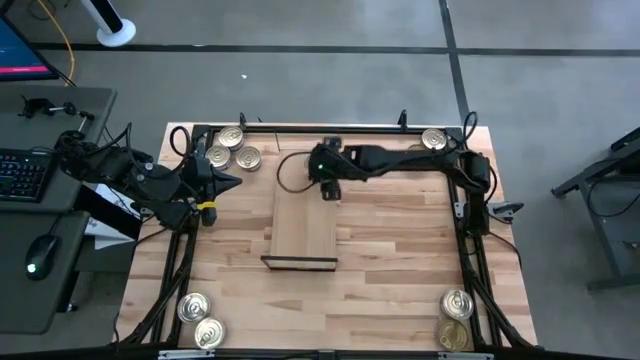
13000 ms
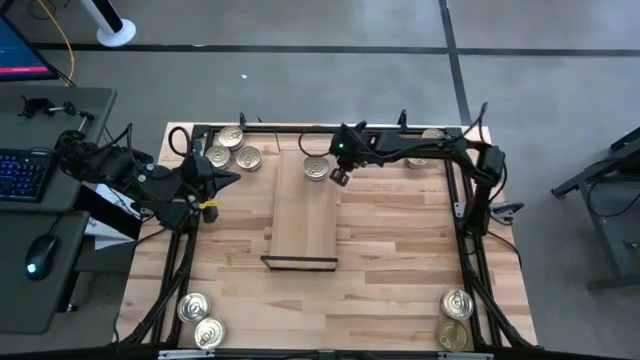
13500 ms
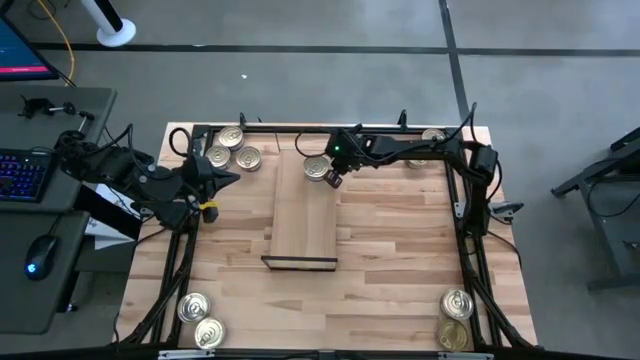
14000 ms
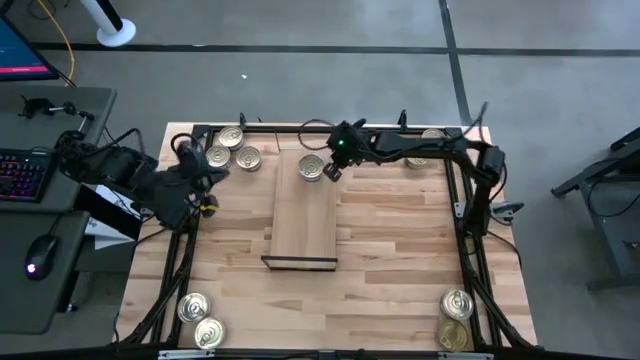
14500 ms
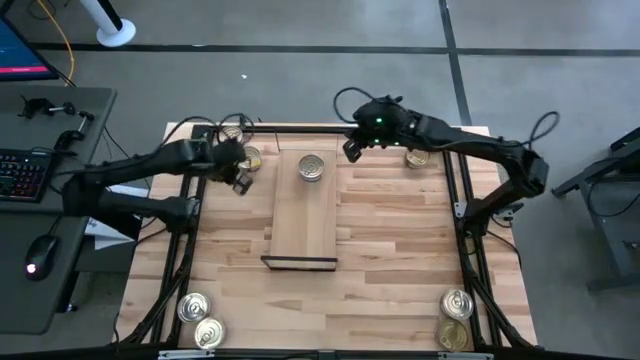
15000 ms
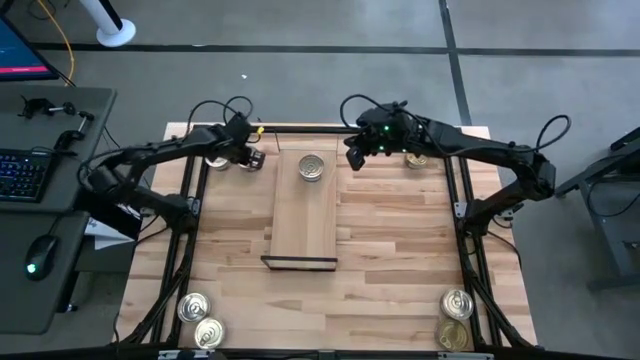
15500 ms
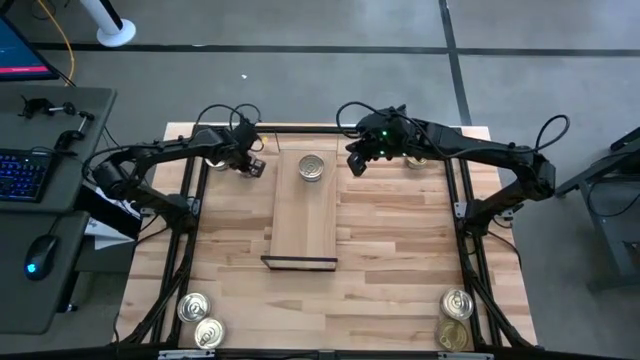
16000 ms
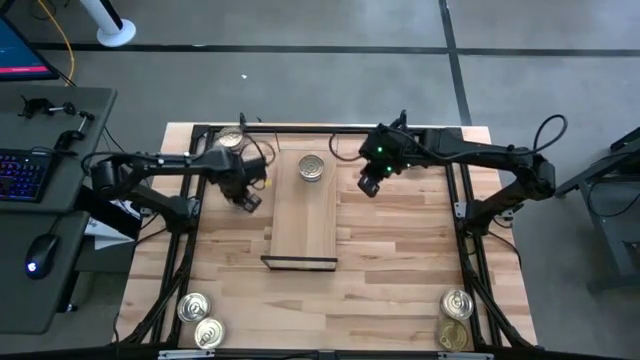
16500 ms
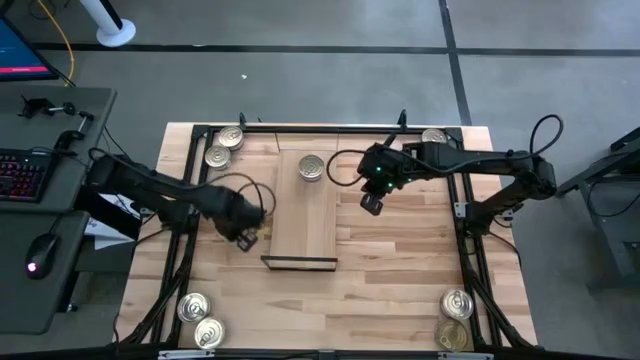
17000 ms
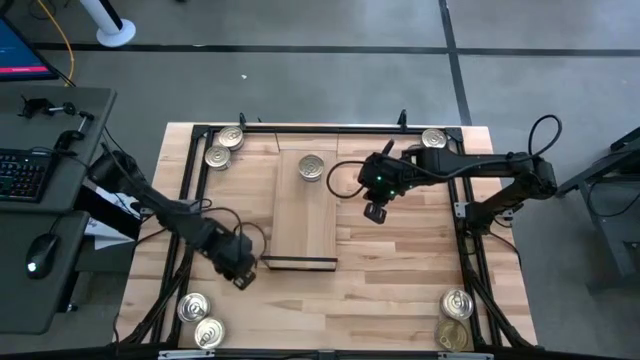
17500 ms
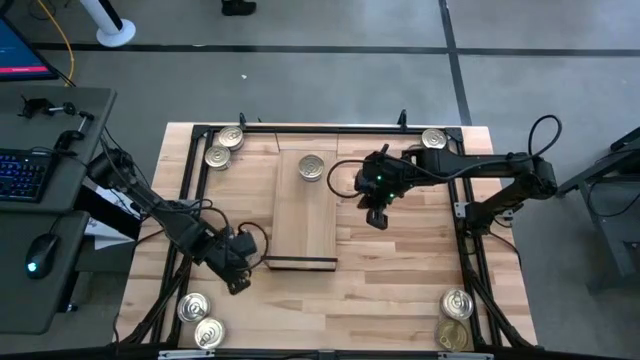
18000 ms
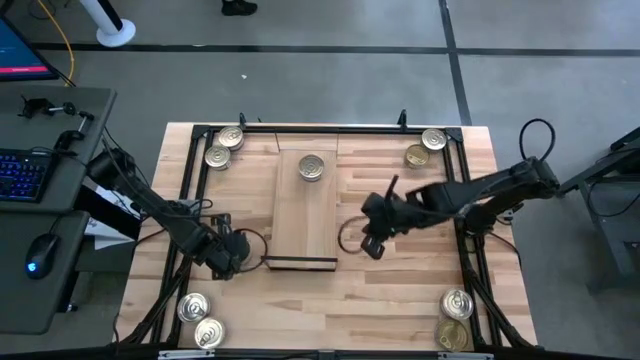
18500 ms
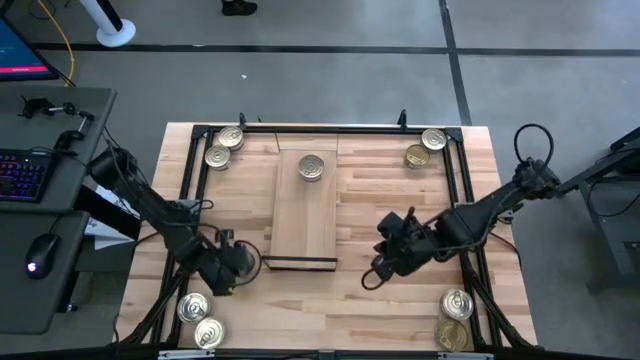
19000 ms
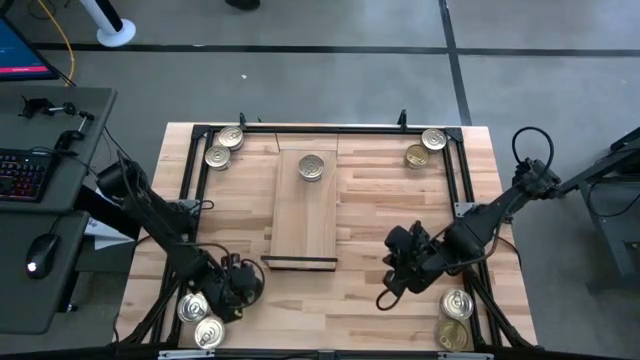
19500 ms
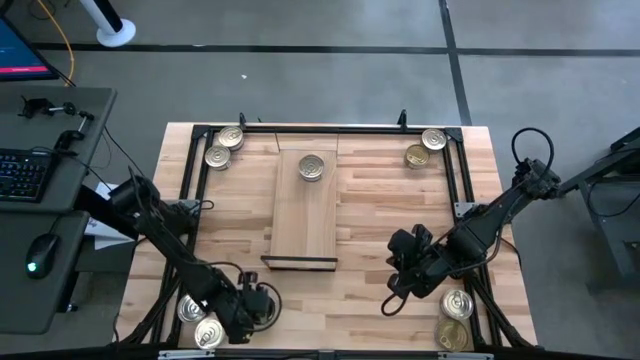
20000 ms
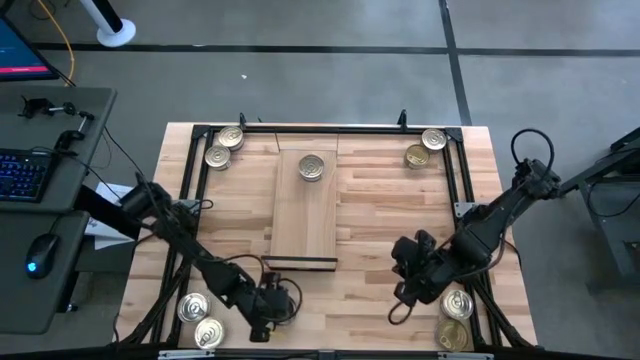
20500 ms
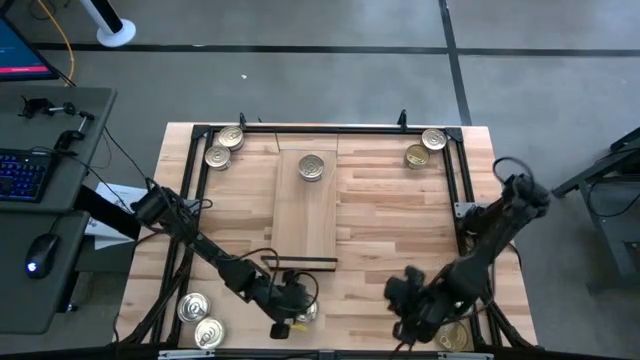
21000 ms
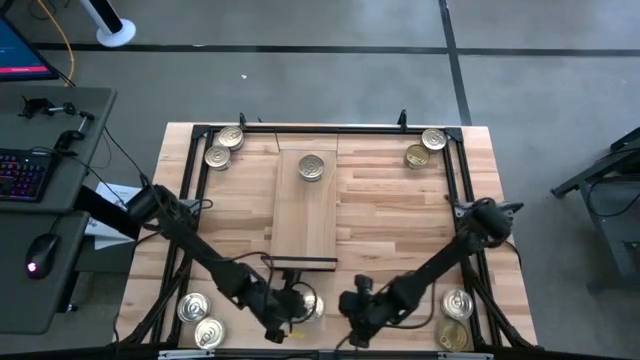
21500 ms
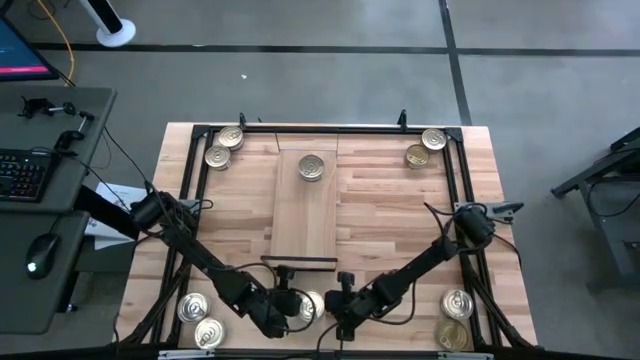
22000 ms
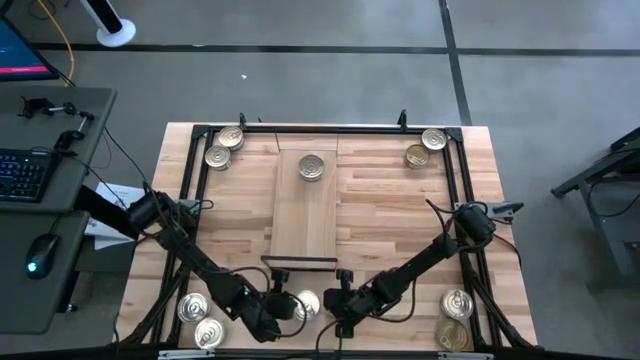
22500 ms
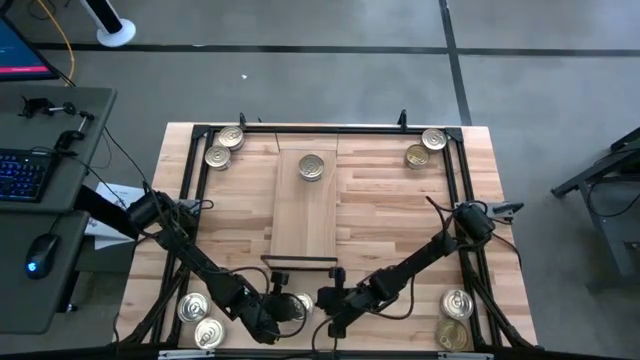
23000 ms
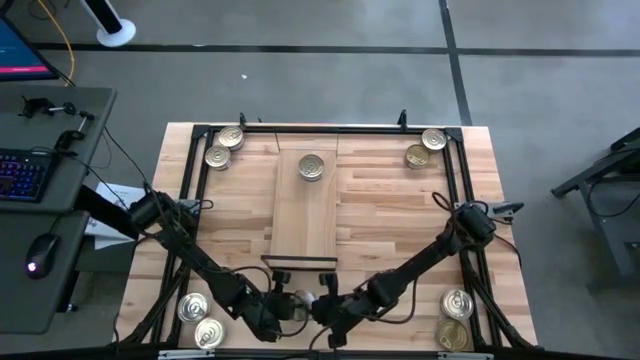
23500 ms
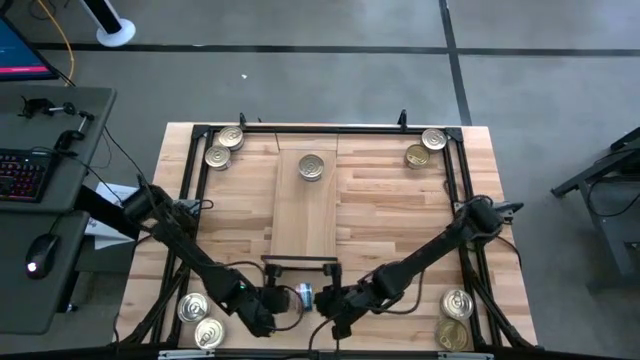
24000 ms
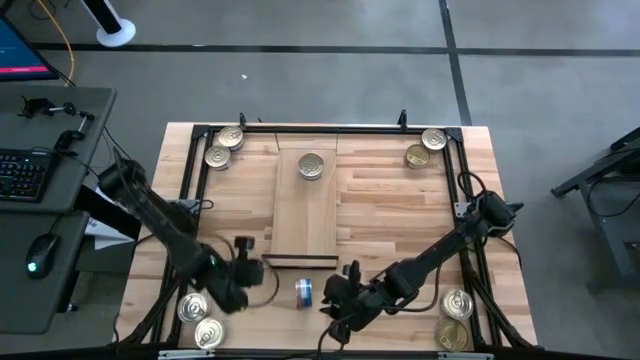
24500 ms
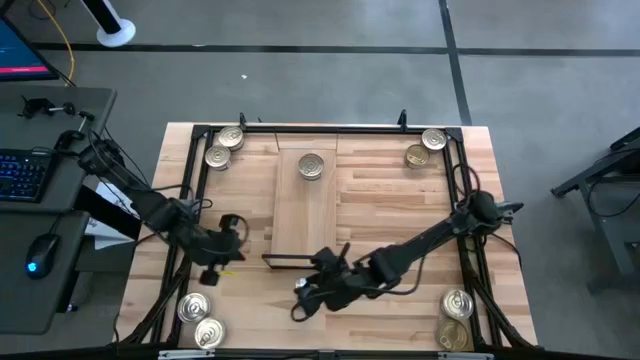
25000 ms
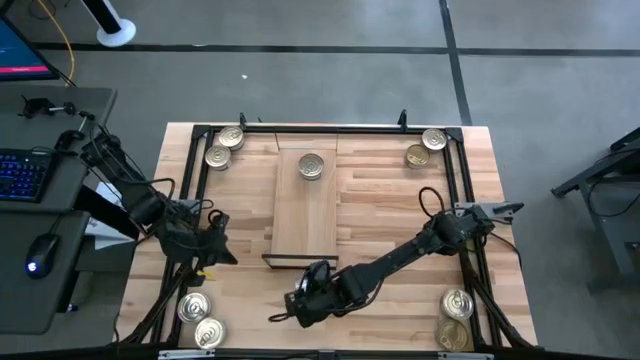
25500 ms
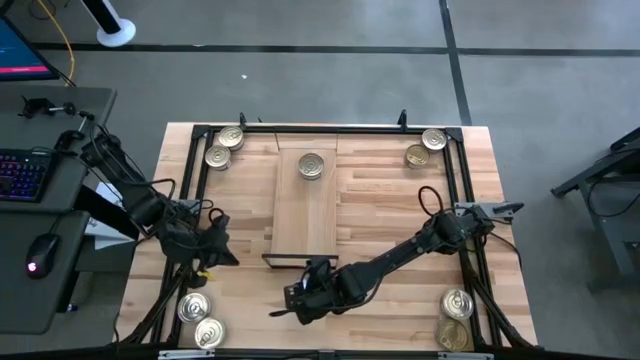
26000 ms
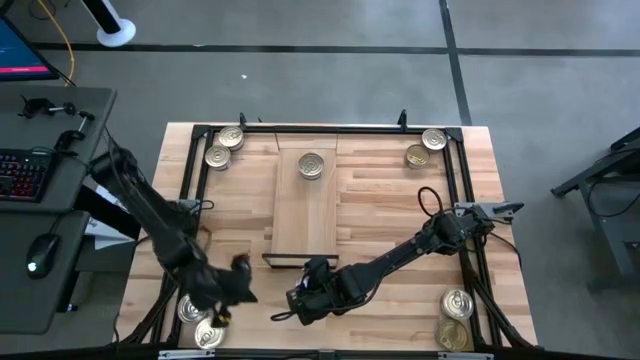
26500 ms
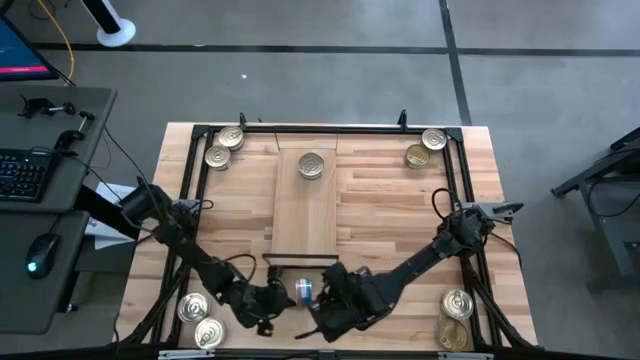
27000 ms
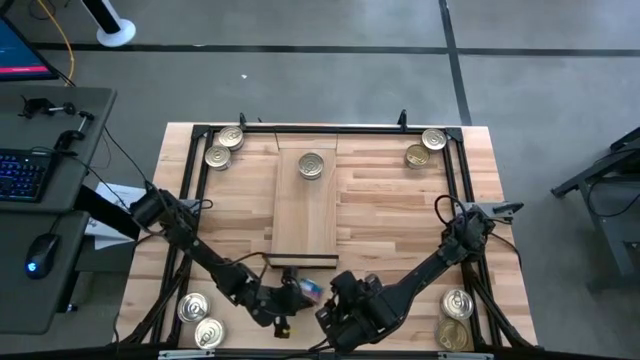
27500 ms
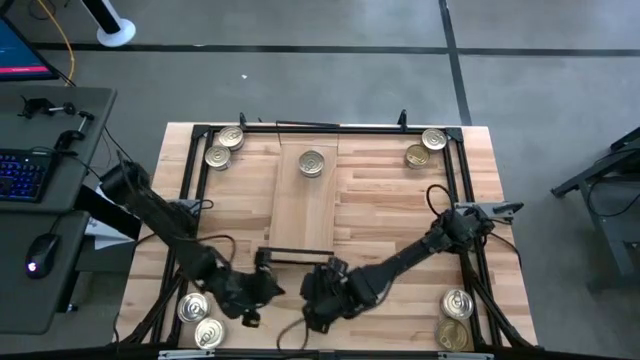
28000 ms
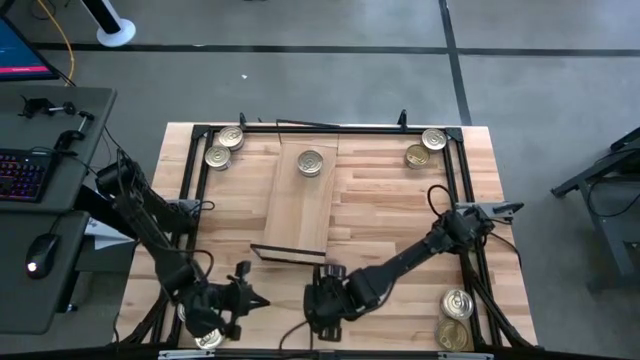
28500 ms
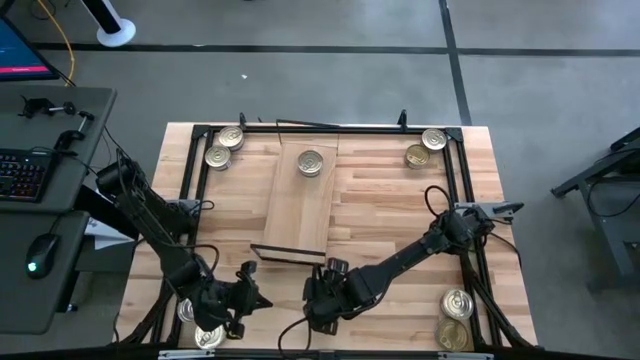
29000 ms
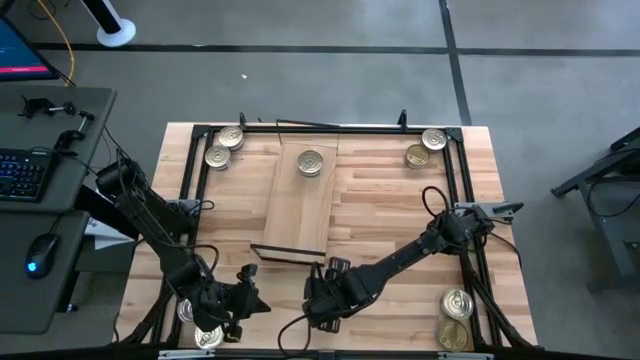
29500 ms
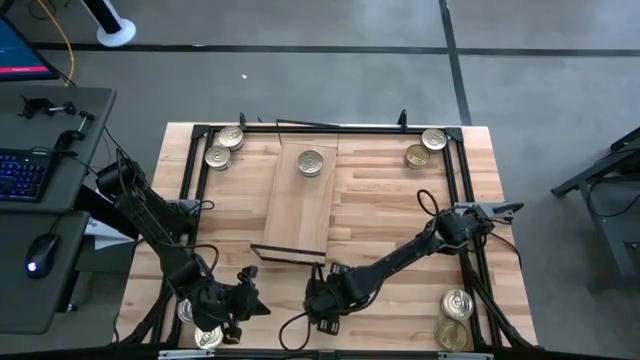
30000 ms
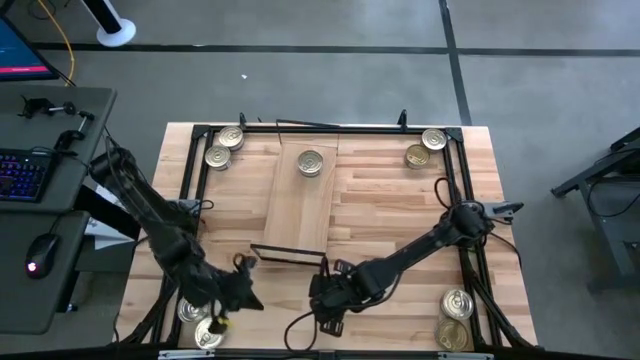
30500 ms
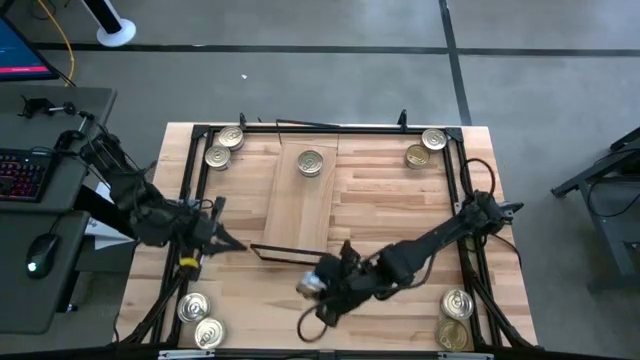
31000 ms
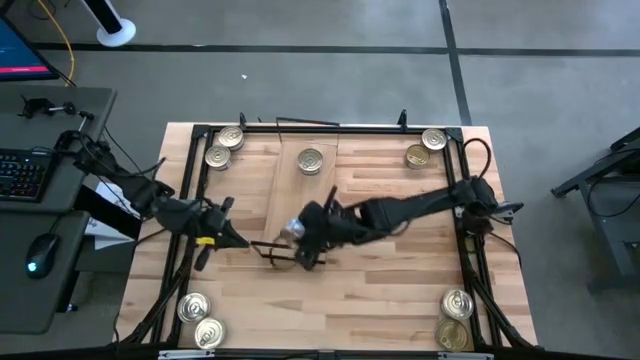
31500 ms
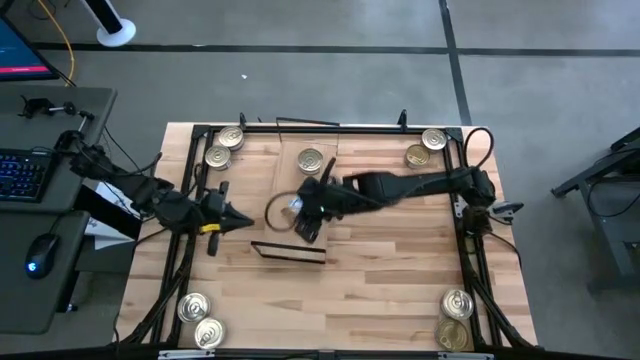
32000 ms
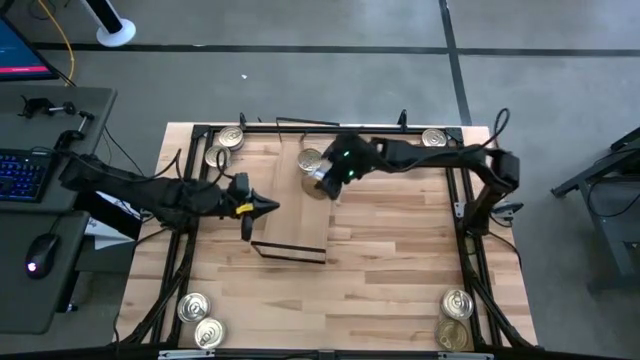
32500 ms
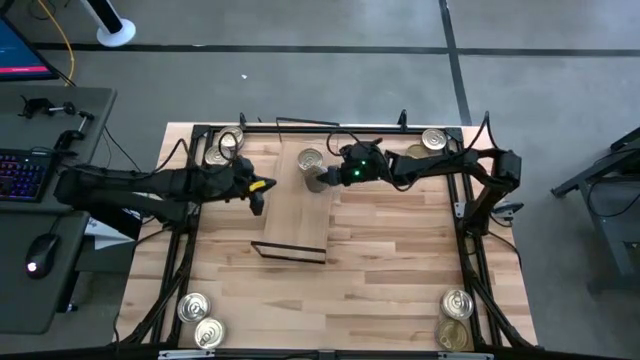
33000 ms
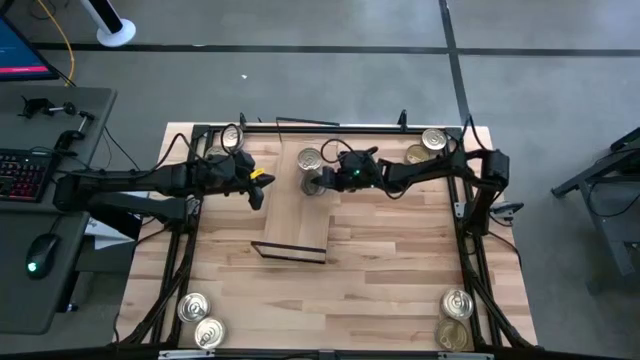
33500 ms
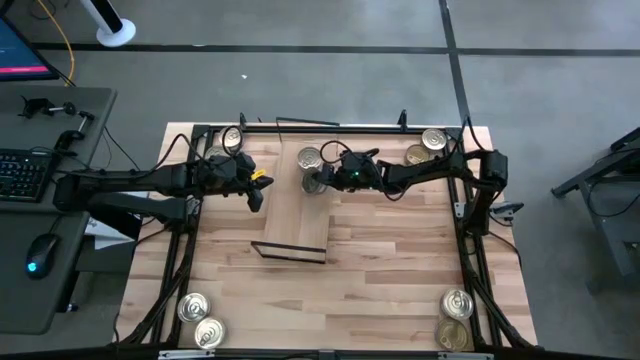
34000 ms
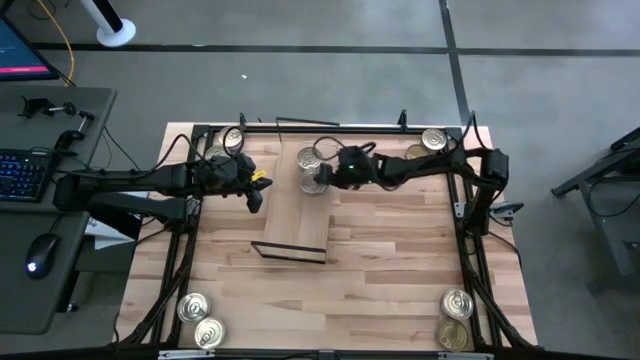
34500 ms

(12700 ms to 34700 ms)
Task: Stack canned seafood by type on shelf
Put the blue pink tuna can on the shelf
